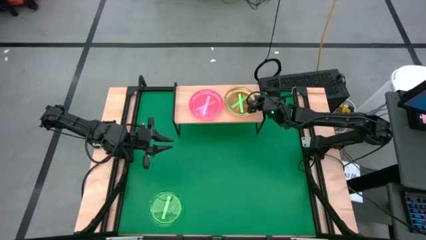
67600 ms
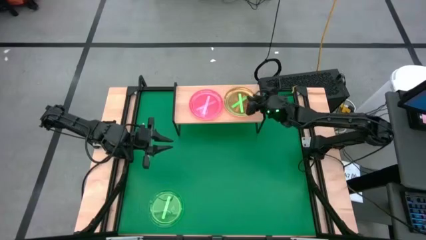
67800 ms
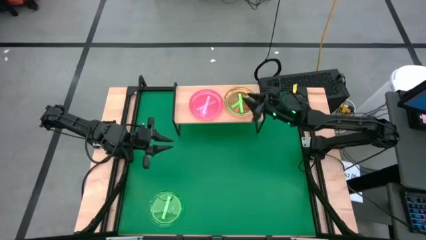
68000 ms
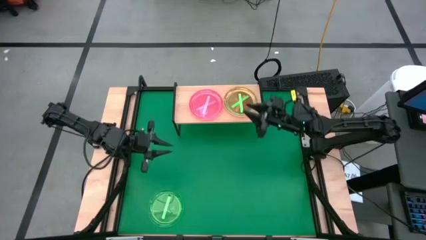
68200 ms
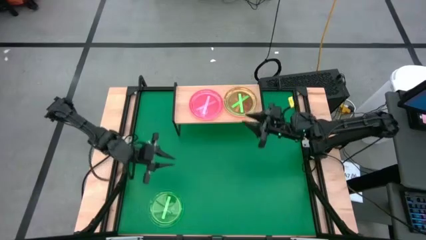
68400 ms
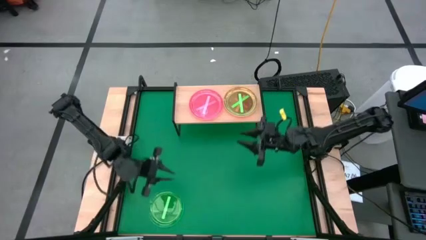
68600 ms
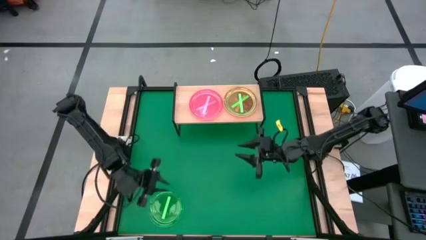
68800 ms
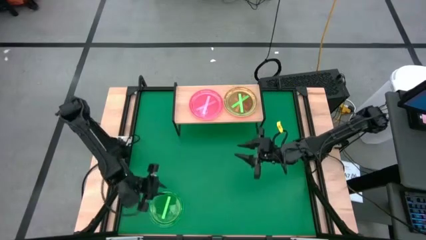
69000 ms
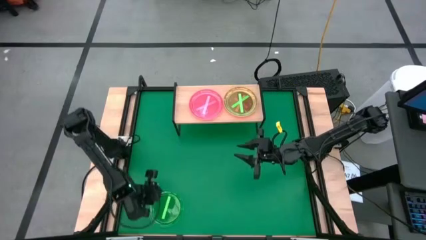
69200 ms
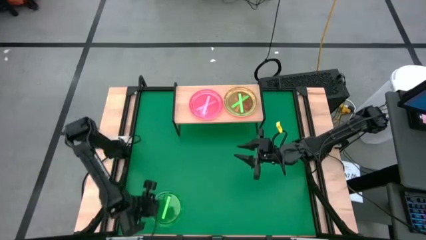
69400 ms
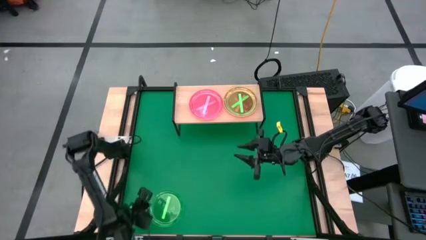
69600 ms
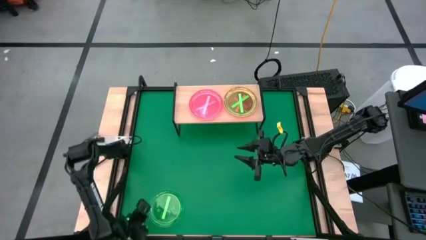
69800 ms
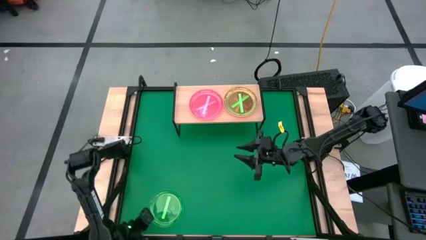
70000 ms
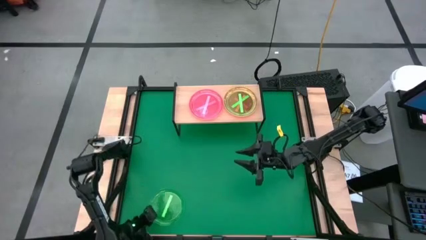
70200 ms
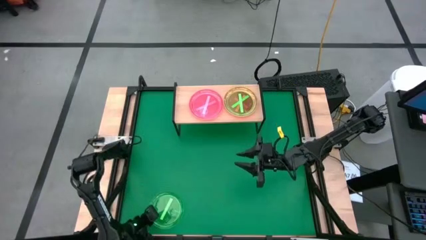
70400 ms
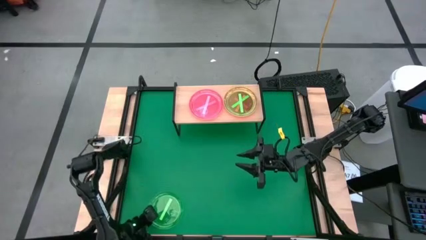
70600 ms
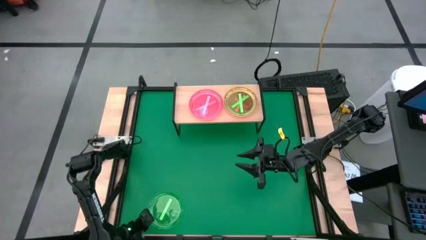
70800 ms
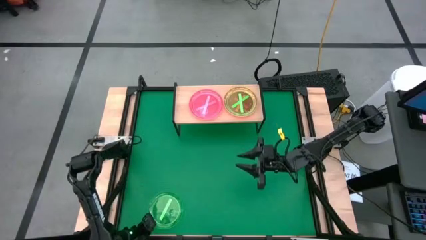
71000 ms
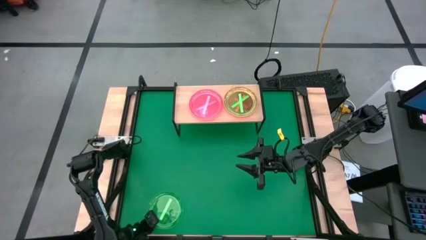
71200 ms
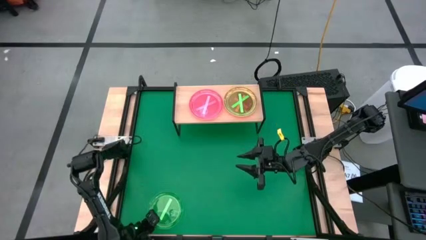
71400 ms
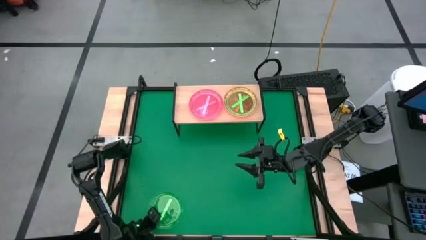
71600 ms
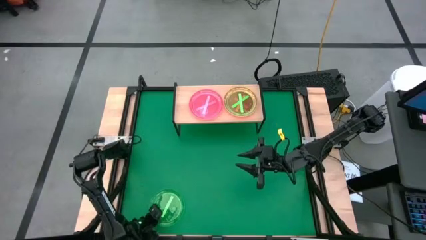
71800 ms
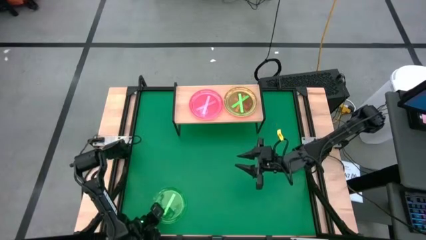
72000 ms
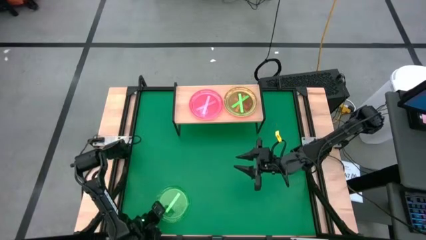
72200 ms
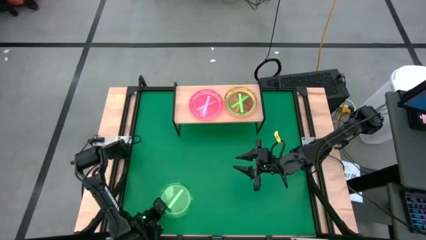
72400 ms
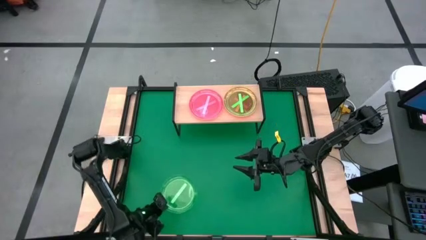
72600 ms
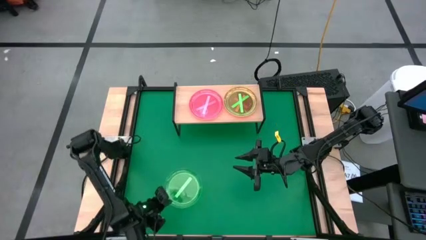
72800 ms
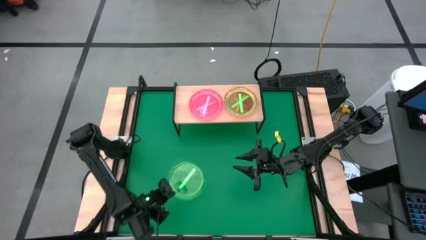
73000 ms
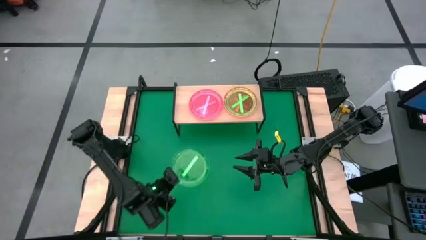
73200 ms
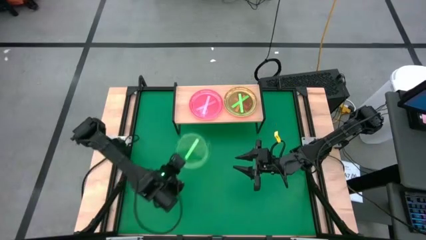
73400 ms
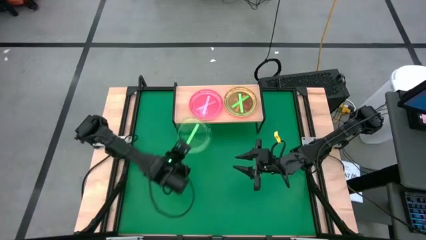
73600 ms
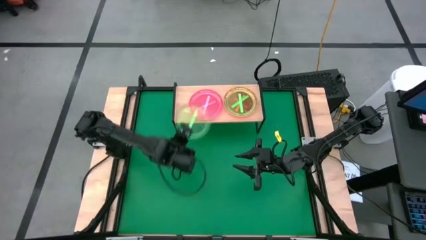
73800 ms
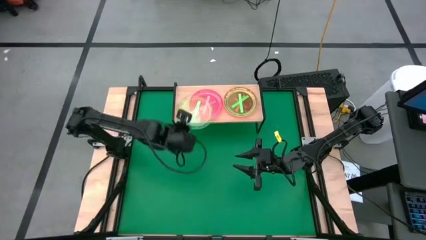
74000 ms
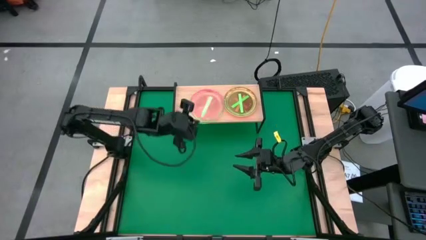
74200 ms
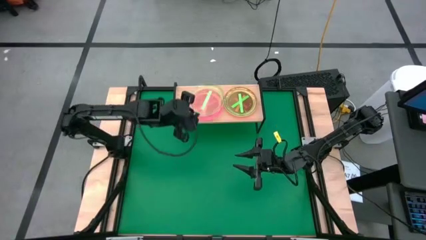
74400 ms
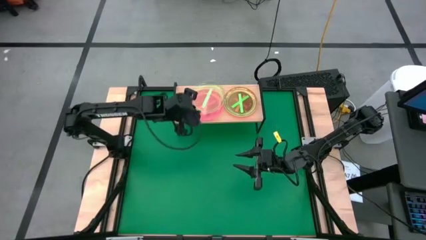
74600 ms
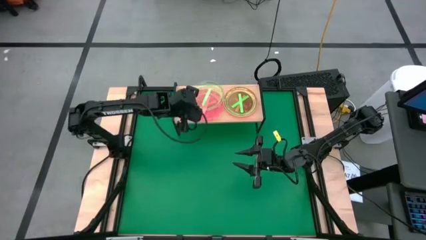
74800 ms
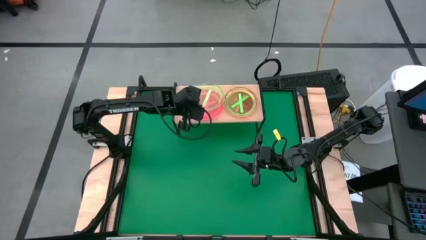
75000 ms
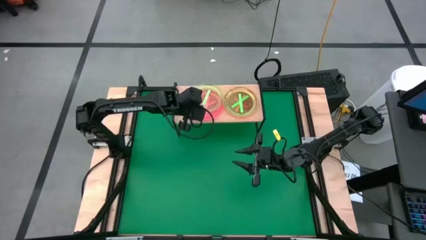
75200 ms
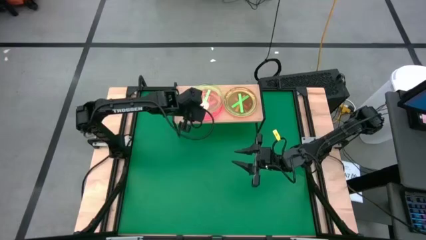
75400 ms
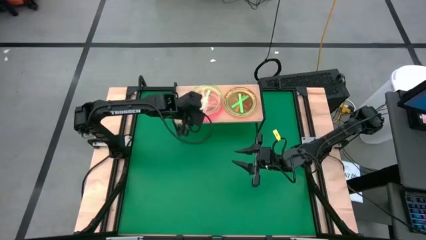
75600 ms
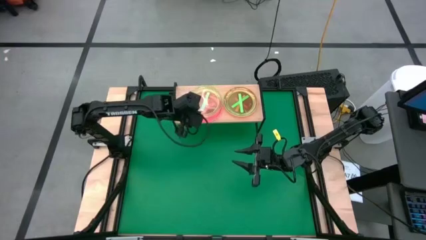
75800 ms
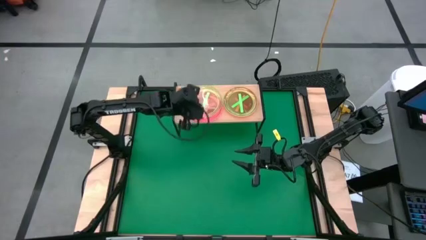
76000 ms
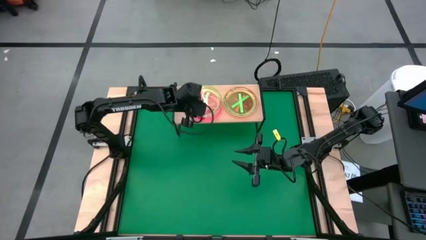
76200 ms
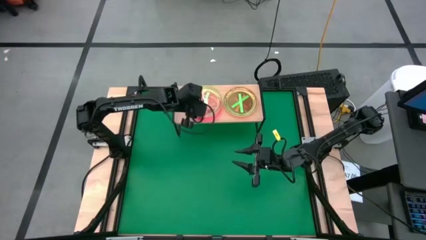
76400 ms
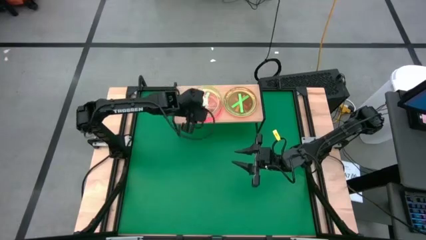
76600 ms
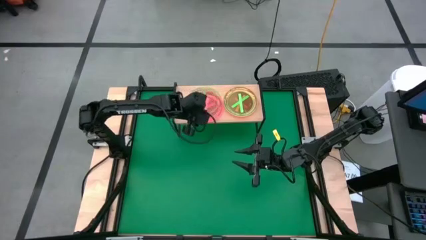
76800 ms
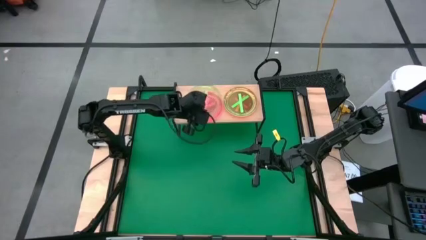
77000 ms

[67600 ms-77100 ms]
Task: Place and stack plates onto a shelf
Stack the green transparent plate on top of the pink transparent plates on the shelf

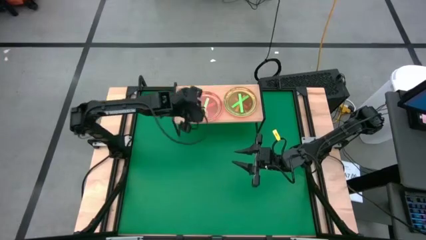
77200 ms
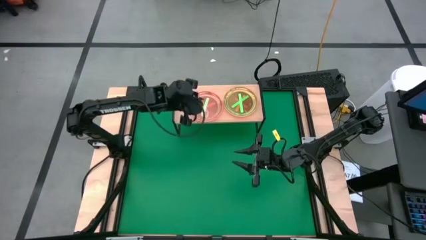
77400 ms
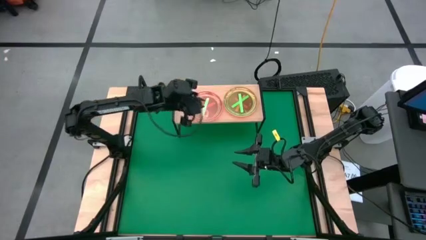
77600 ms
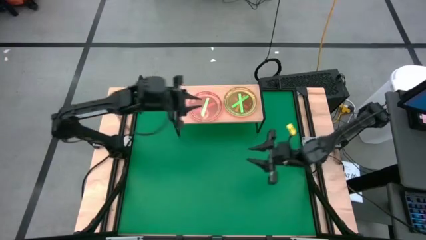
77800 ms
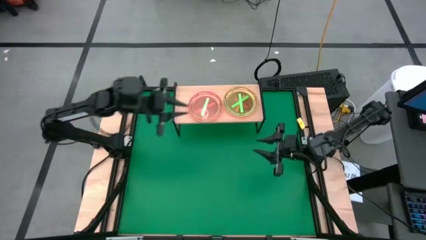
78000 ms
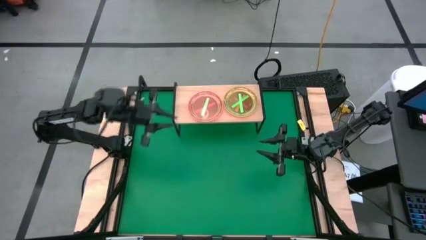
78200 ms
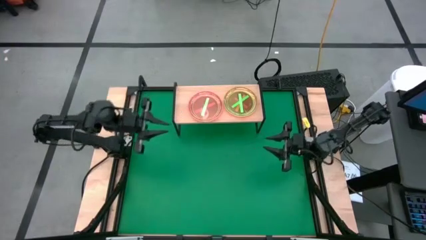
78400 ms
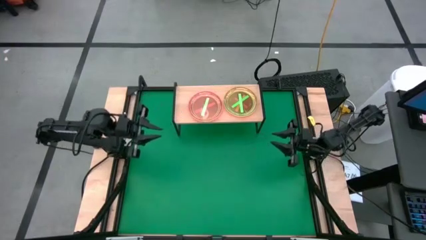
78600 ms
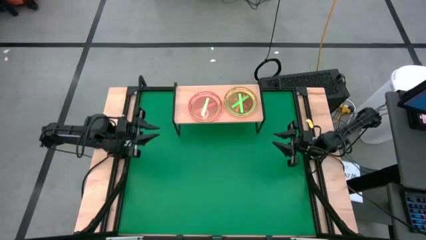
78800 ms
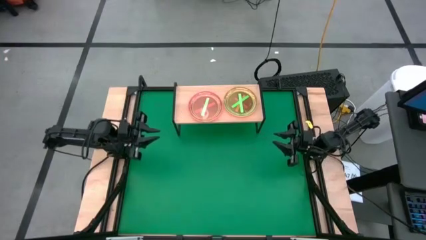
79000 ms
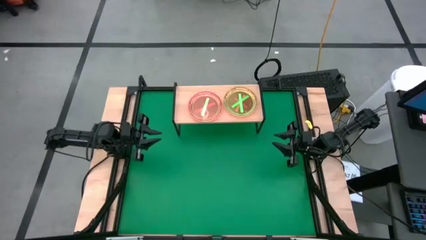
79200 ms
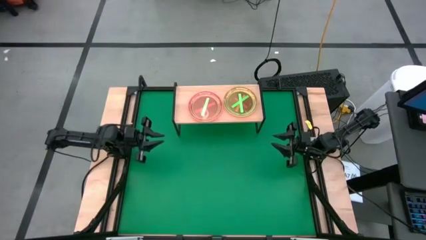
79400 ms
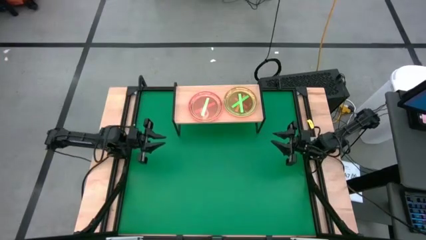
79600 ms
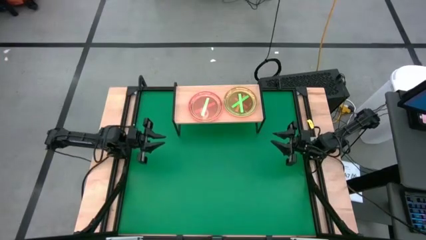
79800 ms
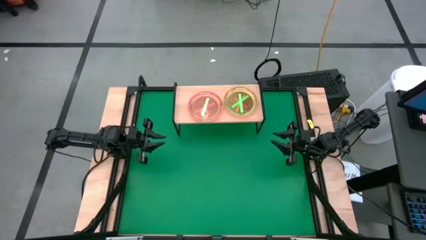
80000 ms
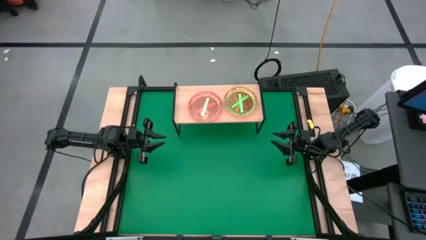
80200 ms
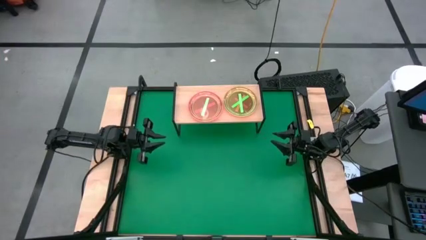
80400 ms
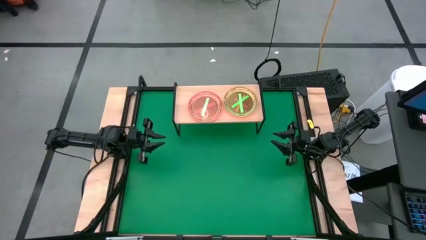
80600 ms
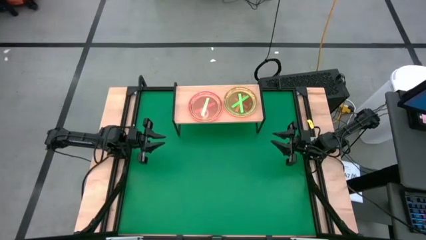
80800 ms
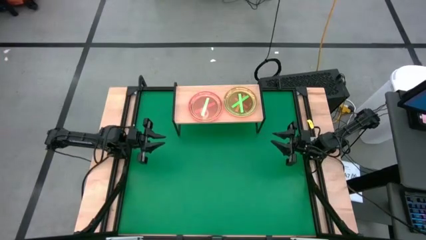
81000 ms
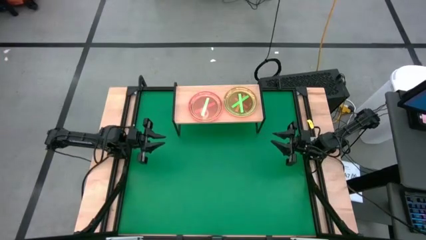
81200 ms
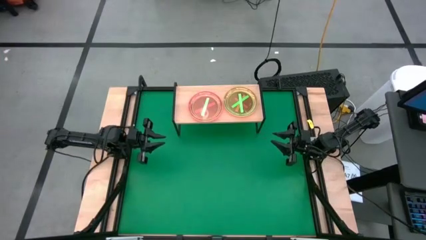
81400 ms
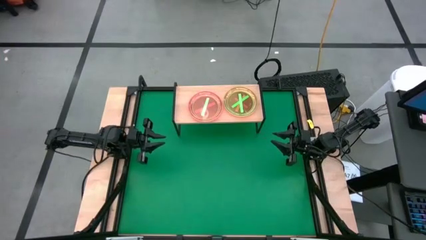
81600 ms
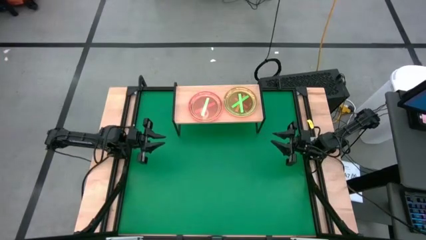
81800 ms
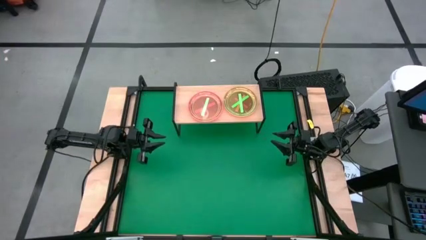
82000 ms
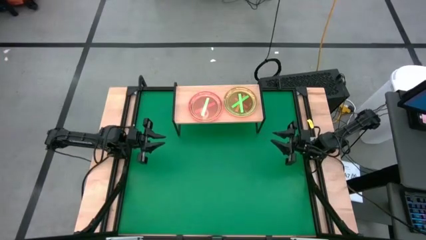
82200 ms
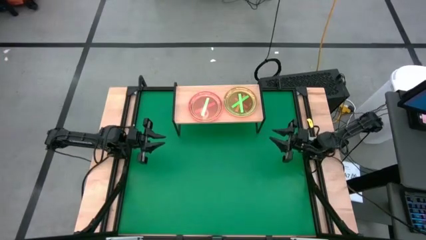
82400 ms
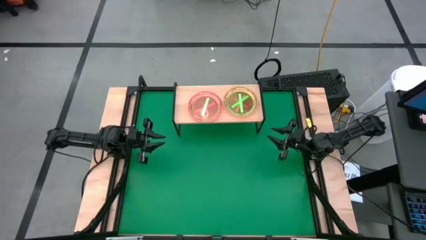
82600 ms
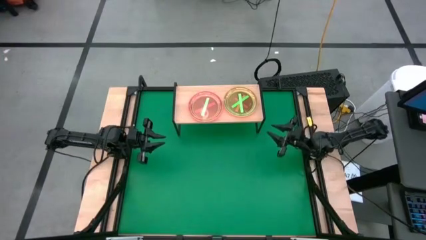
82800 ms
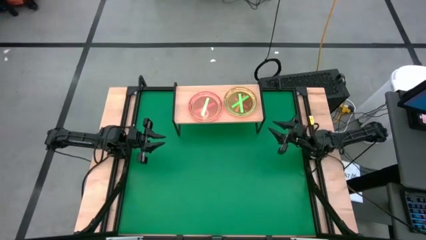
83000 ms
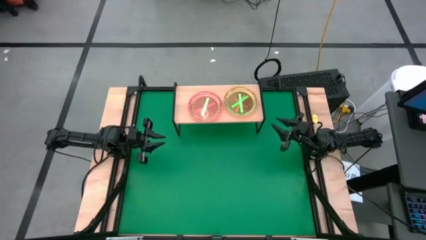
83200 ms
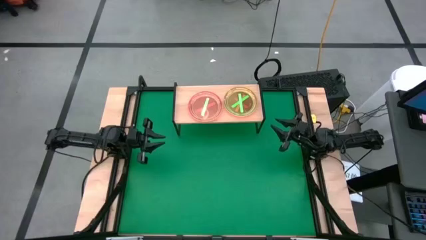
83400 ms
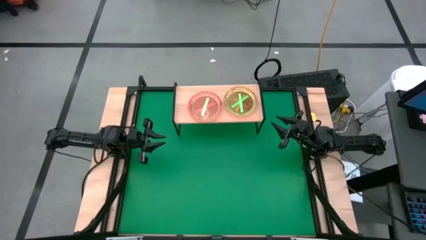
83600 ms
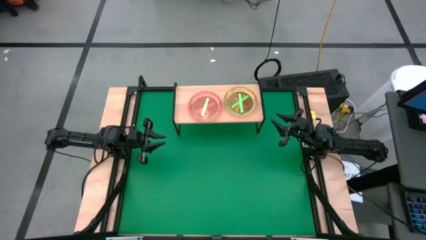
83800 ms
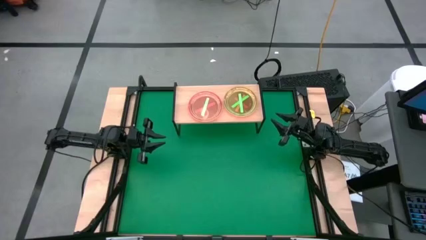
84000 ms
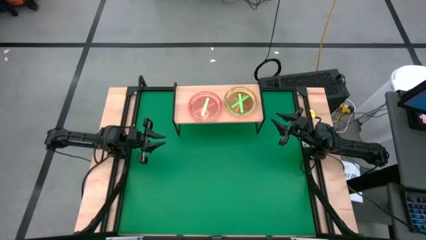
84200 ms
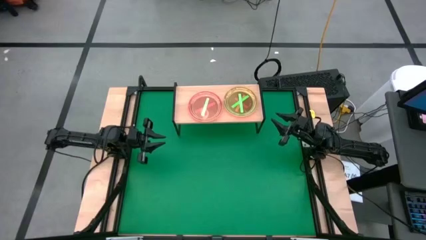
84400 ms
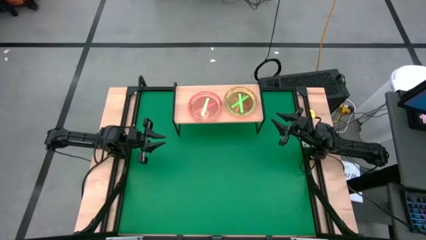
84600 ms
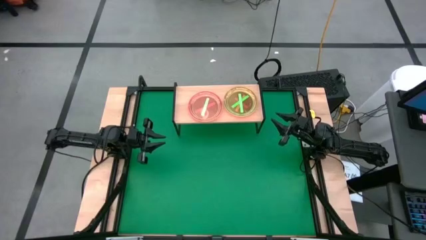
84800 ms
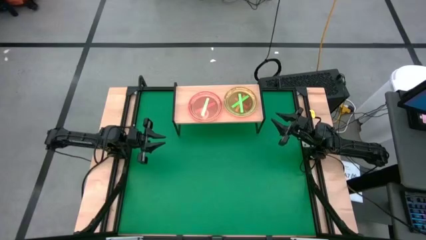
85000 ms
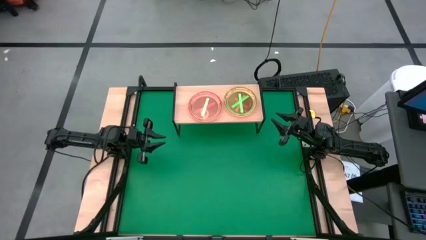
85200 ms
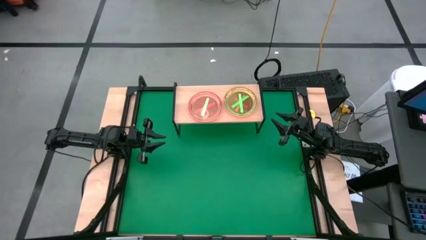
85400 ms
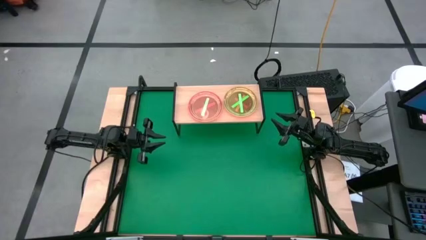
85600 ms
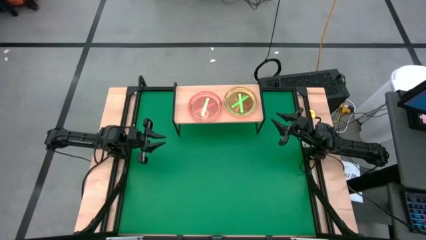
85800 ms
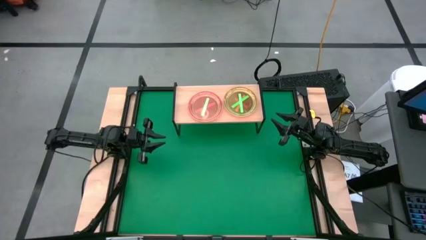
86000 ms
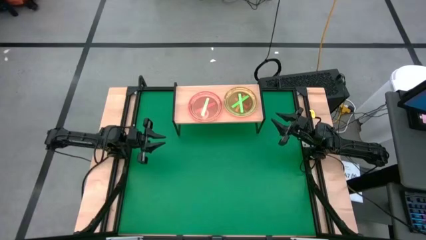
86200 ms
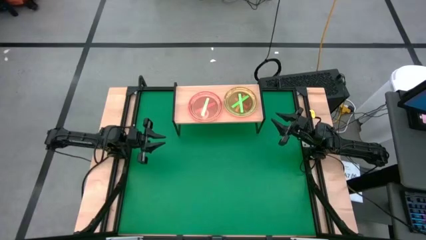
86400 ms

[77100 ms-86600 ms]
Return to Home Position
